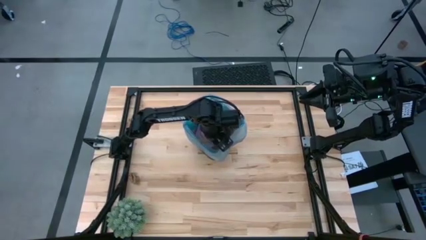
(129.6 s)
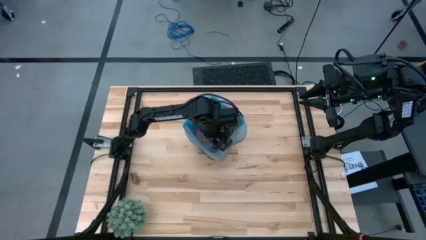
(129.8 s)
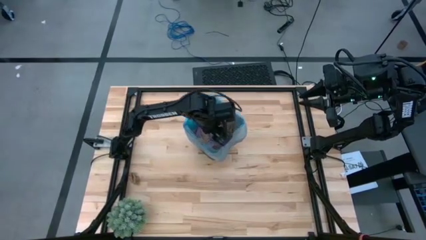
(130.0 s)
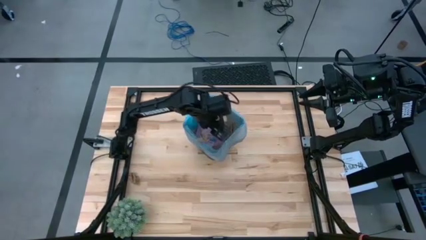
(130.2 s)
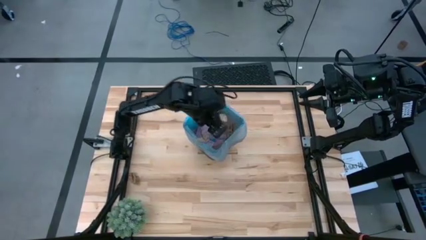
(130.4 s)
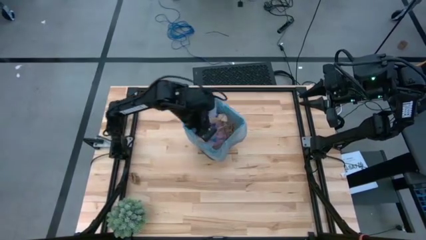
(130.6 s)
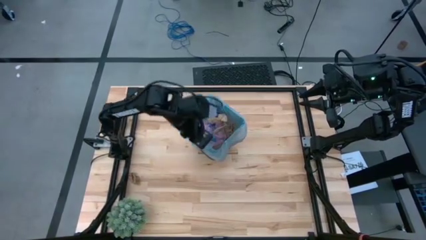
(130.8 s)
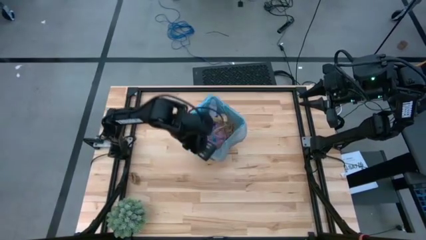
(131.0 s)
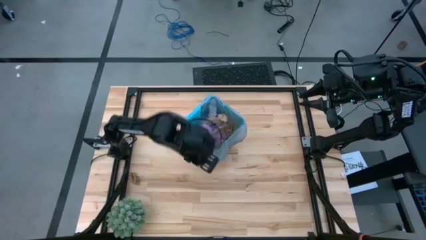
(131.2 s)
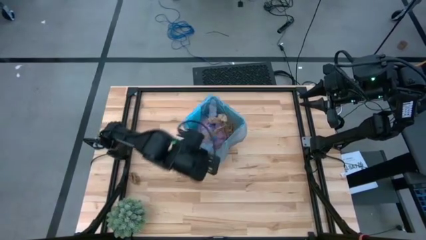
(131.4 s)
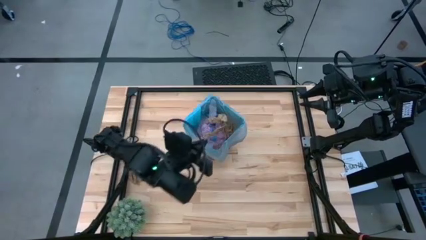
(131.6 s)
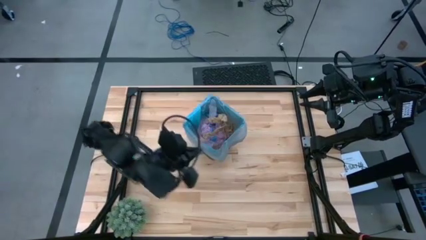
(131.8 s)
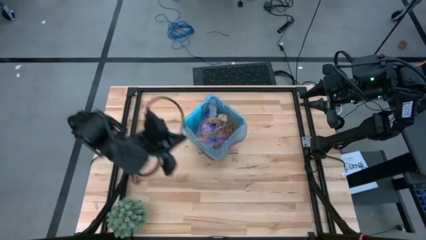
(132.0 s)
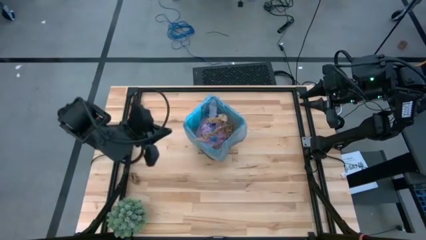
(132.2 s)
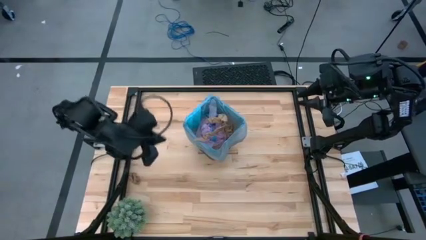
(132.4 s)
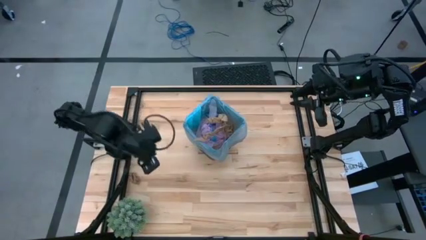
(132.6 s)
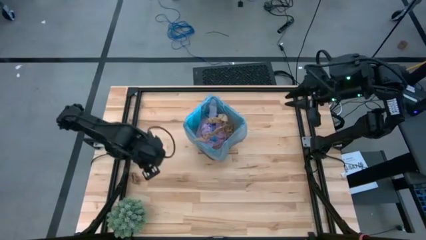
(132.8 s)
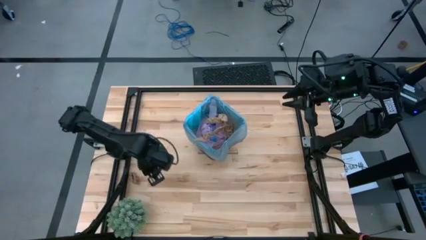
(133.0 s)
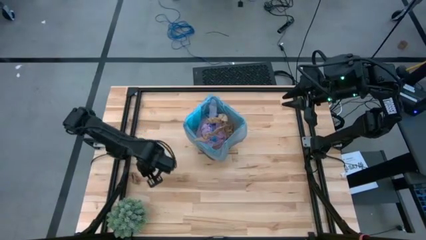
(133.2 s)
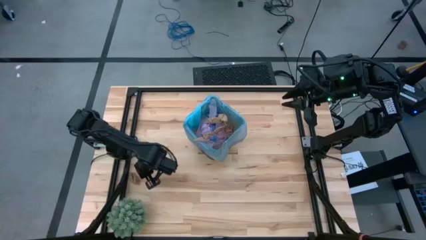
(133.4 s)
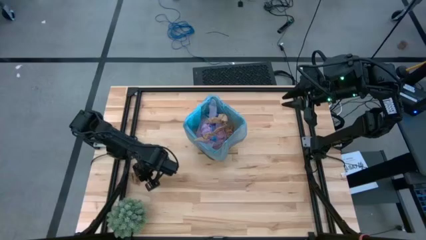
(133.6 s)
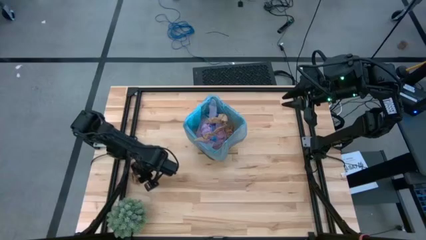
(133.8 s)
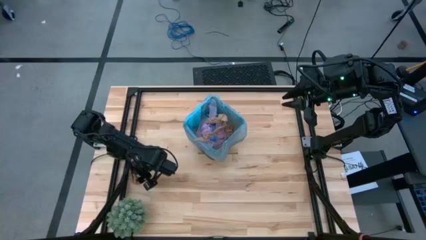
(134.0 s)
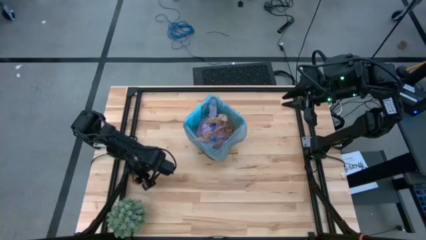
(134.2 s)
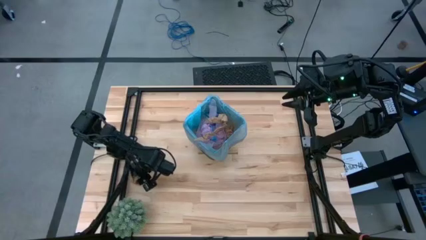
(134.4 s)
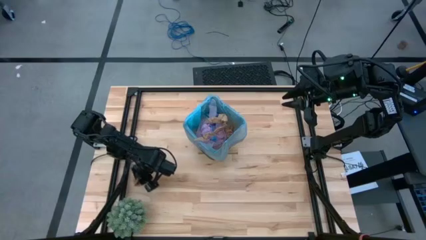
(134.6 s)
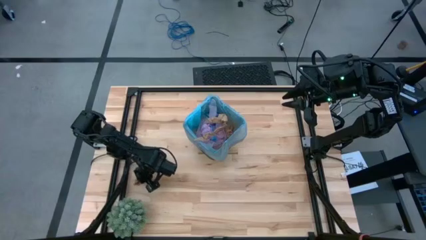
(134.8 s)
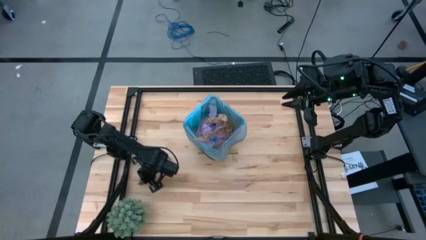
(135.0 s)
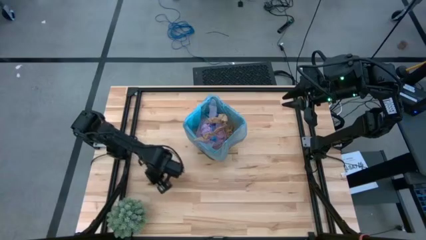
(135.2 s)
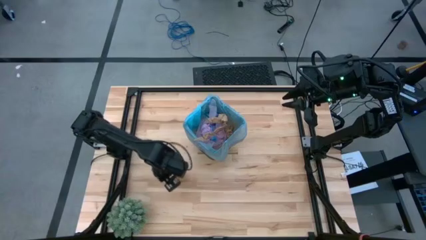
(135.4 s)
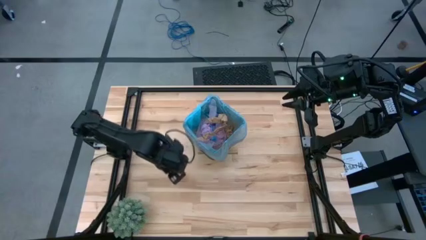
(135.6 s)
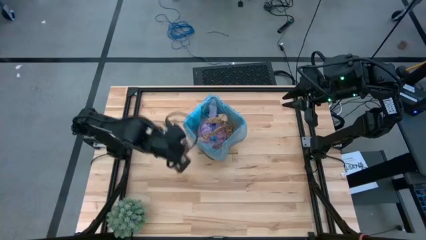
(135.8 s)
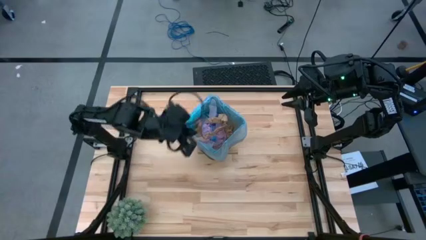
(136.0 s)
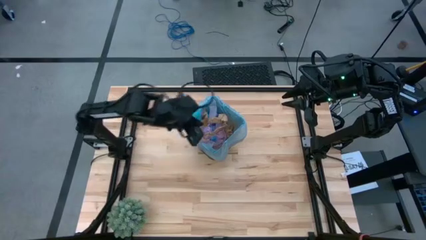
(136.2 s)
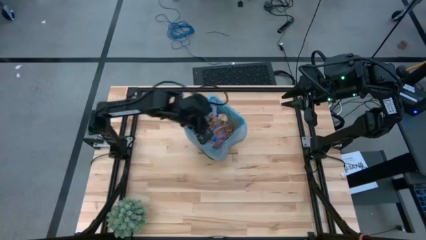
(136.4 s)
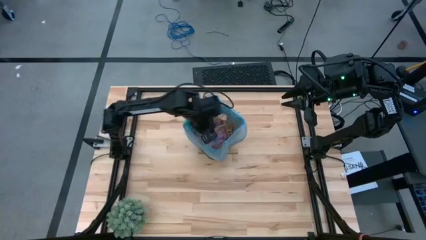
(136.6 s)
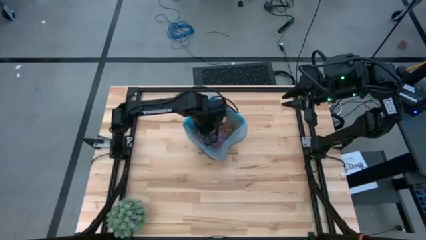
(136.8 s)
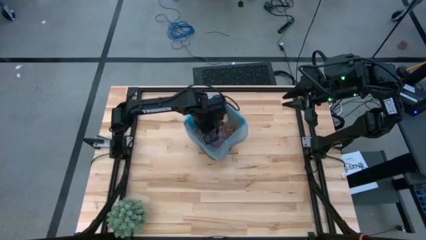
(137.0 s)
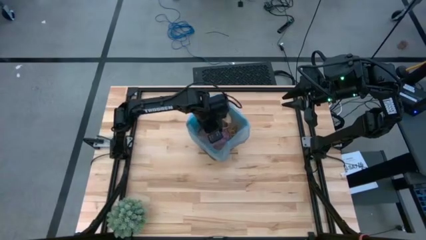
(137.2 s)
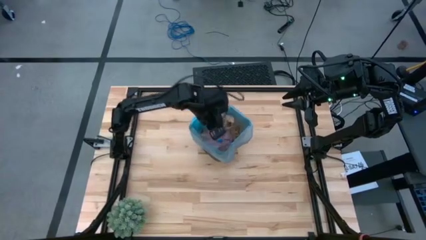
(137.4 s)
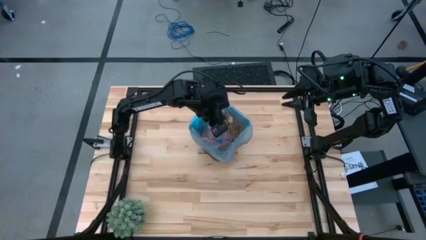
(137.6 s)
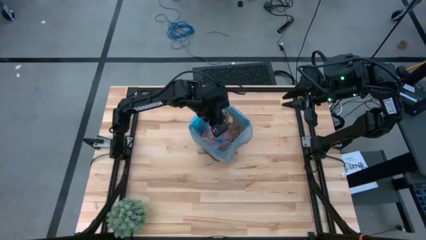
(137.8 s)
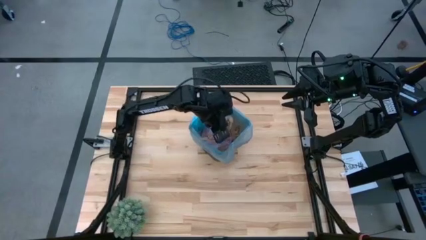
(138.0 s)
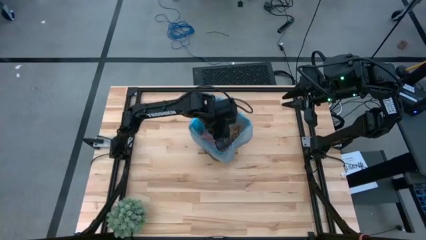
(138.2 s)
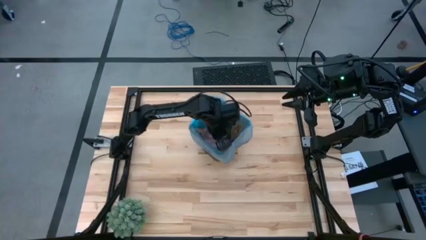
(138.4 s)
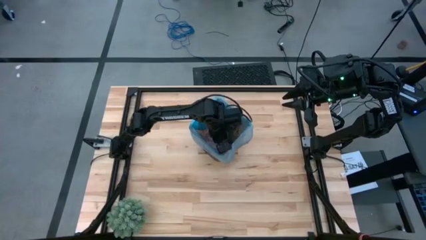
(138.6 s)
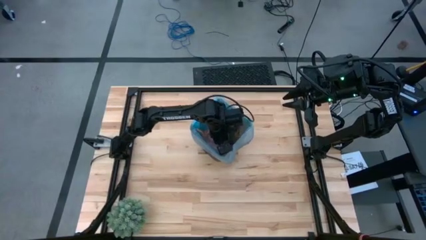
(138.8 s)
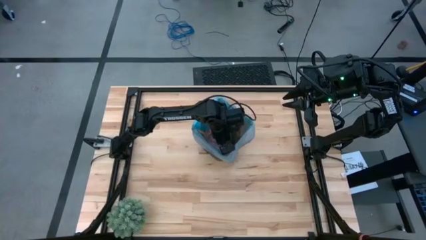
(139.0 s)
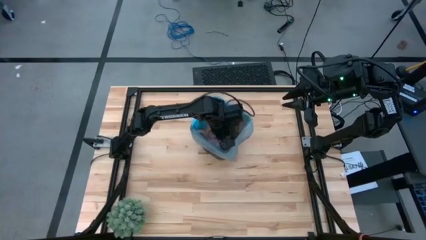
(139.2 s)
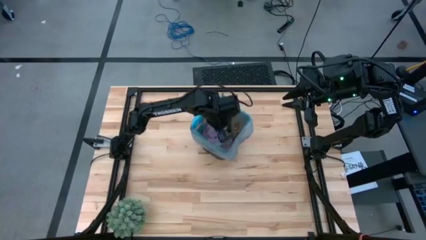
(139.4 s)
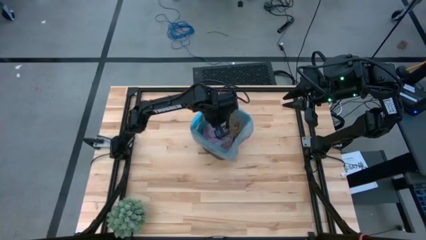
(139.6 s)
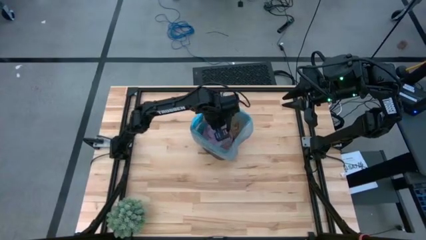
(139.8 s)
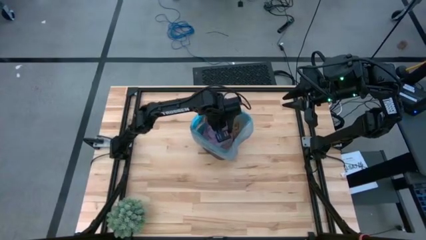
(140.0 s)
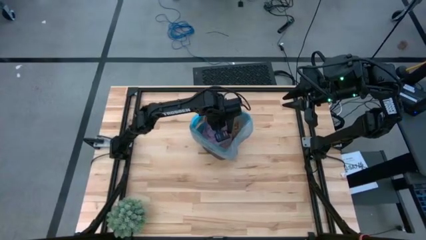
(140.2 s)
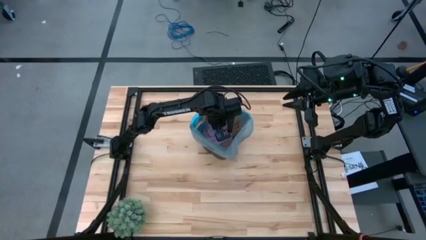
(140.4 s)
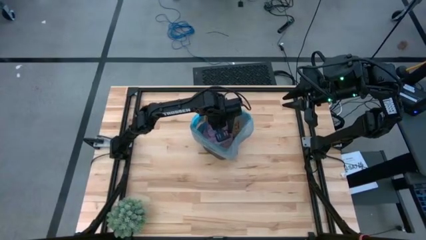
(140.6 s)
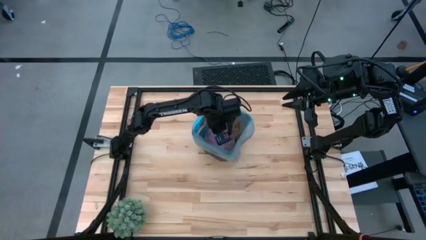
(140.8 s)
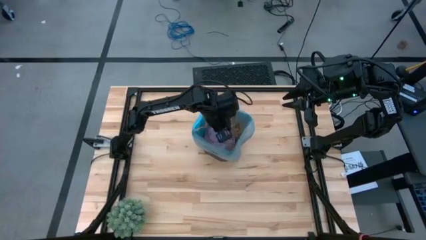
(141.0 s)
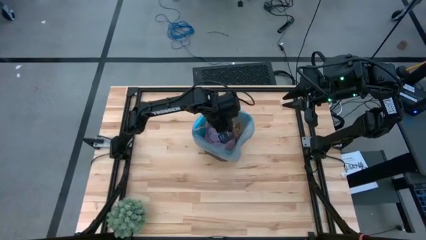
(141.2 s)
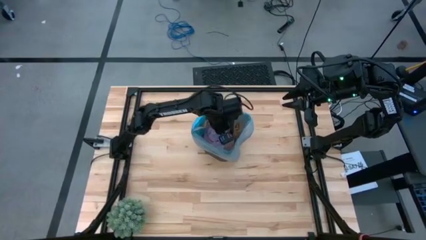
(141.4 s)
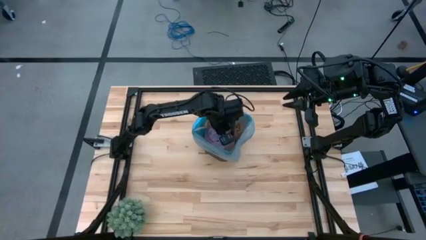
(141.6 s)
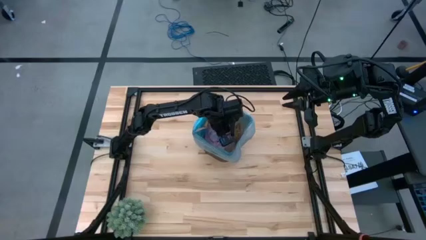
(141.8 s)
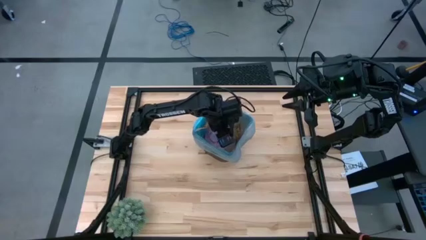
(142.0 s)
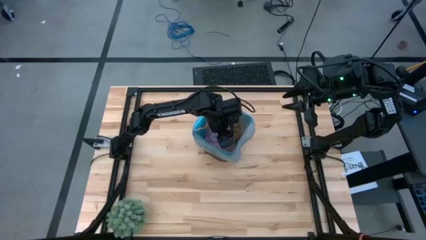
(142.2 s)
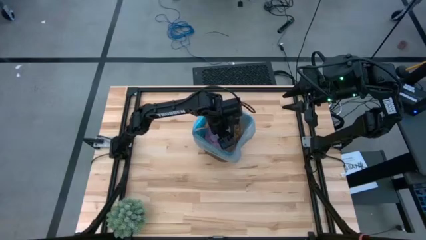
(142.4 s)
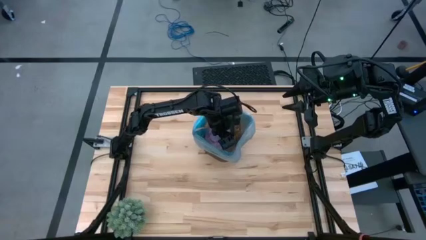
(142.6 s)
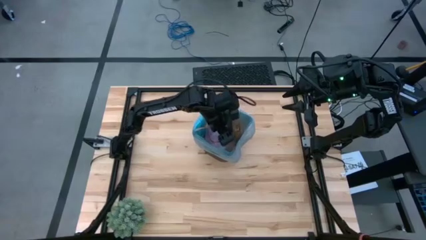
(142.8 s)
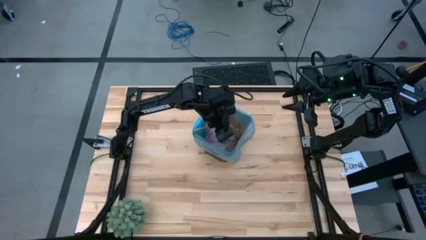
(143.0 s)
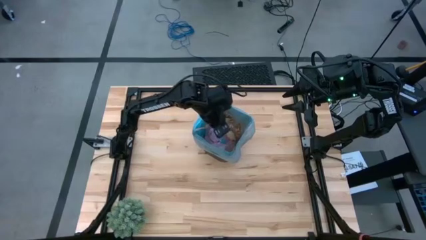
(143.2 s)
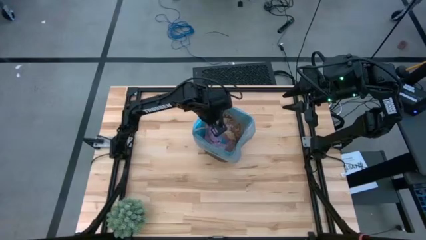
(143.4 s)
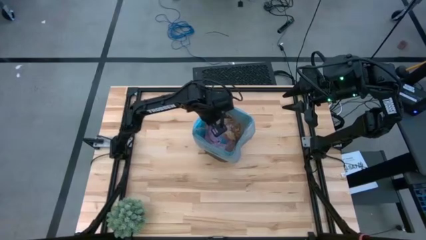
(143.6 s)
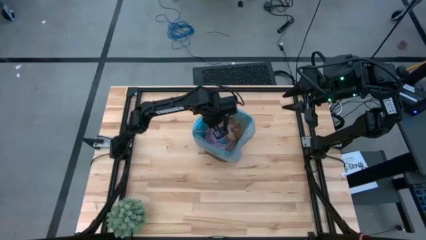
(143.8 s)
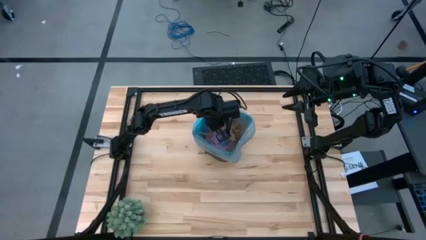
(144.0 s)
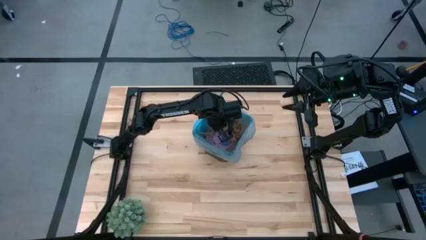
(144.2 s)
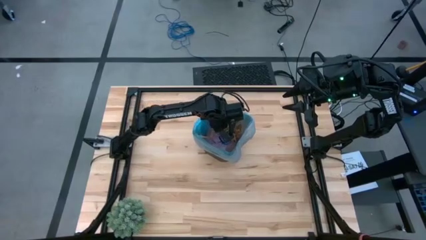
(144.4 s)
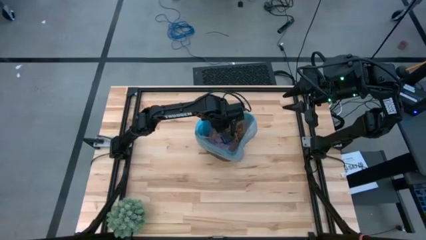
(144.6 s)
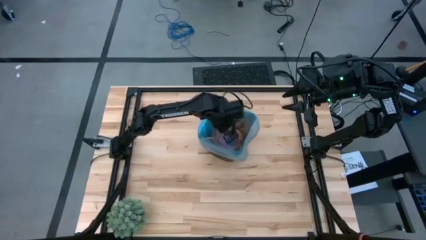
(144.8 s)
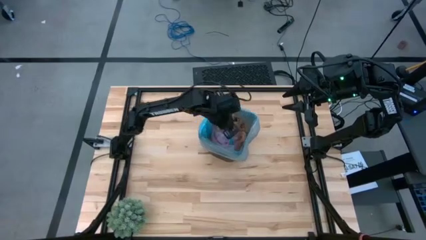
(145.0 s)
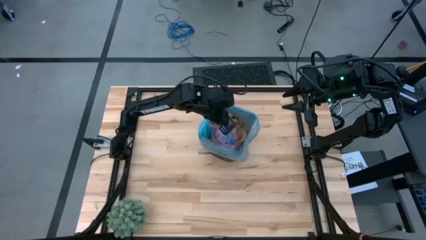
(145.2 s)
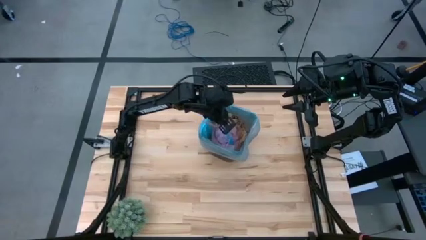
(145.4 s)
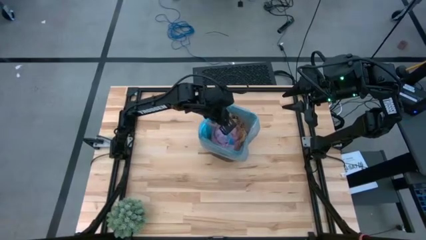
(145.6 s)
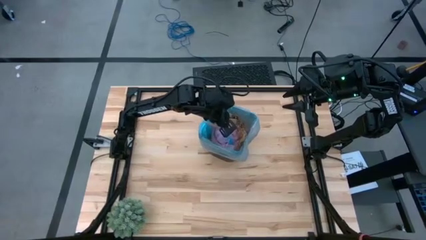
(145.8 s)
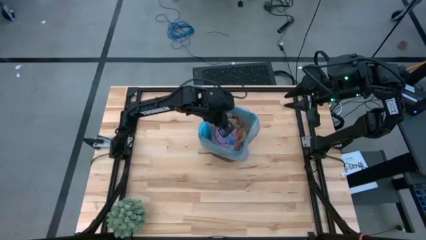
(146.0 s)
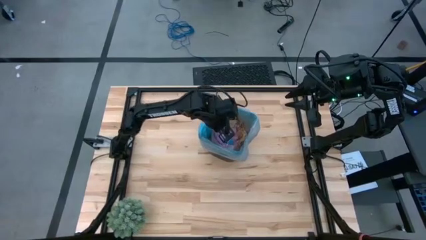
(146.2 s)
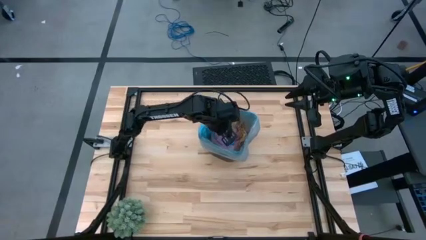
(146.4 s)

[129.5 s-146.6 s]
Task: Pick and place trash into bin
Put the brown paper into the brown trash bin
